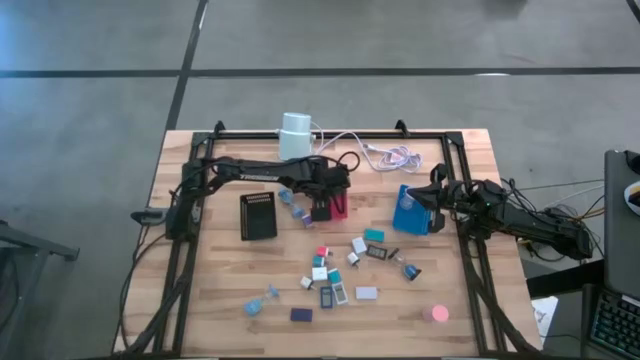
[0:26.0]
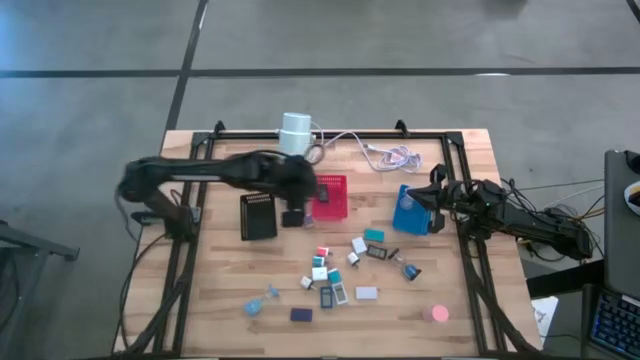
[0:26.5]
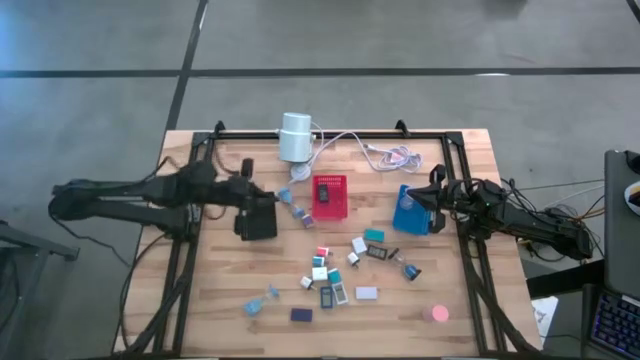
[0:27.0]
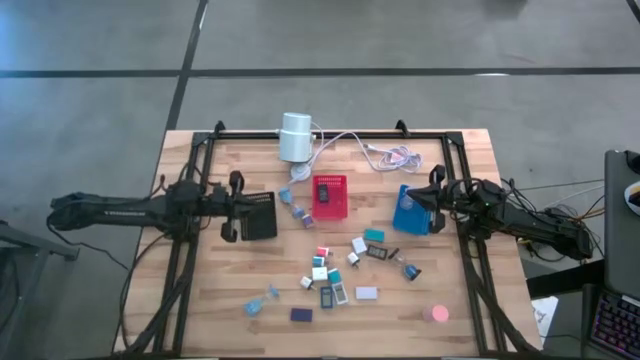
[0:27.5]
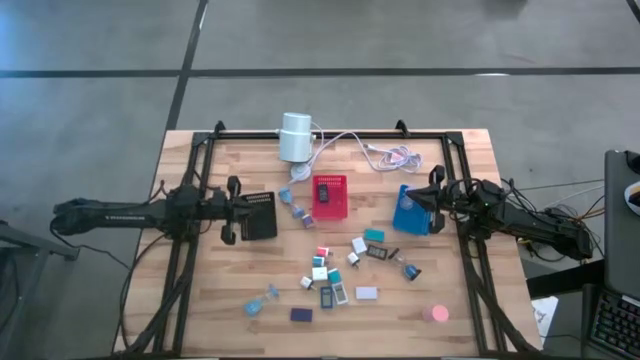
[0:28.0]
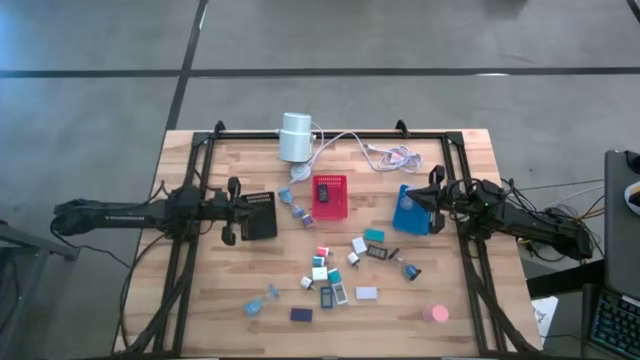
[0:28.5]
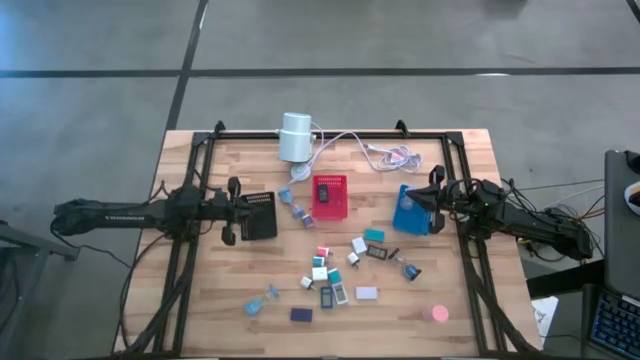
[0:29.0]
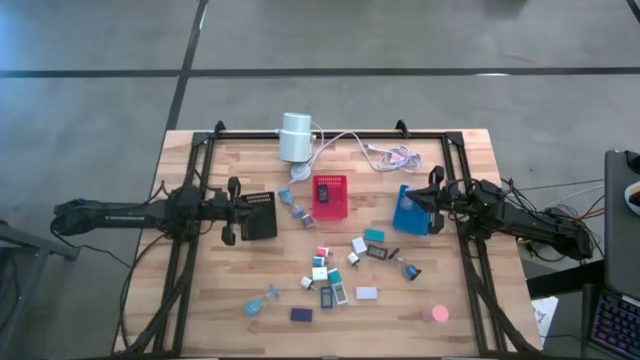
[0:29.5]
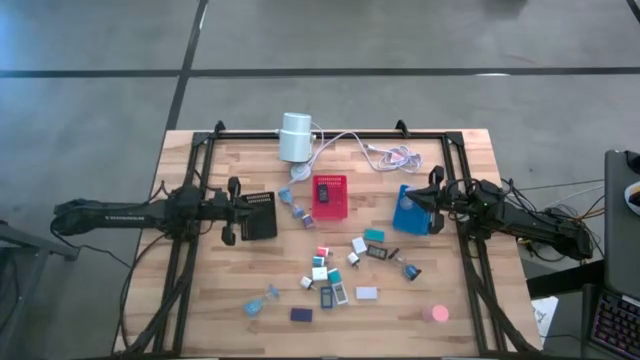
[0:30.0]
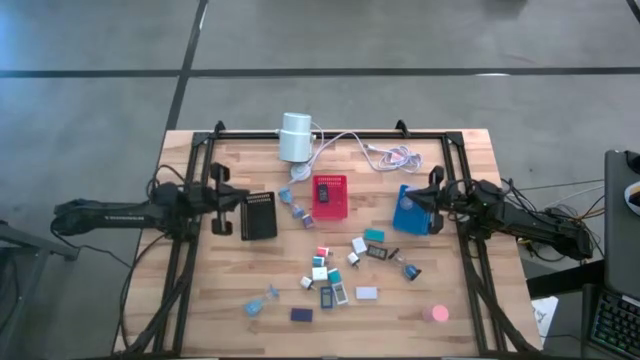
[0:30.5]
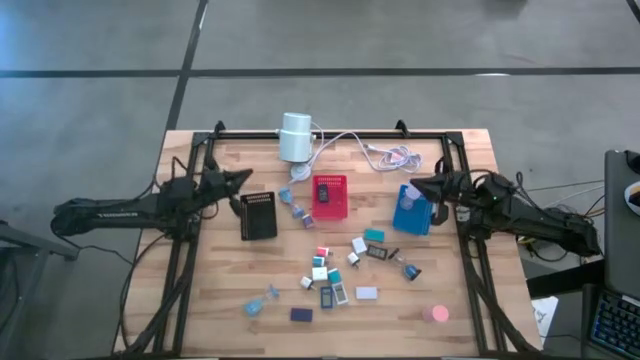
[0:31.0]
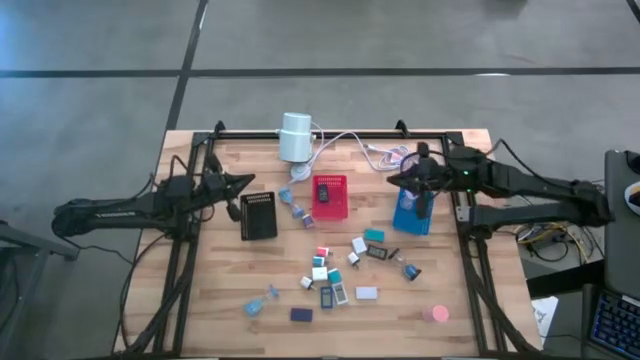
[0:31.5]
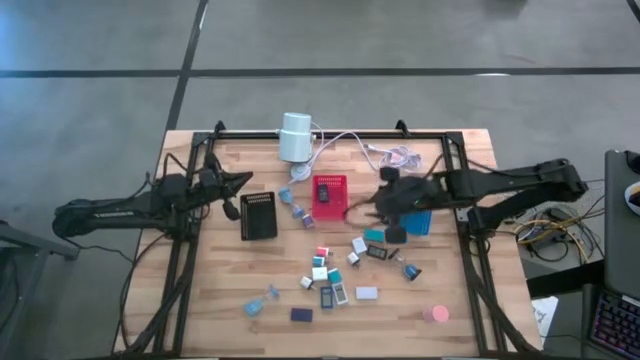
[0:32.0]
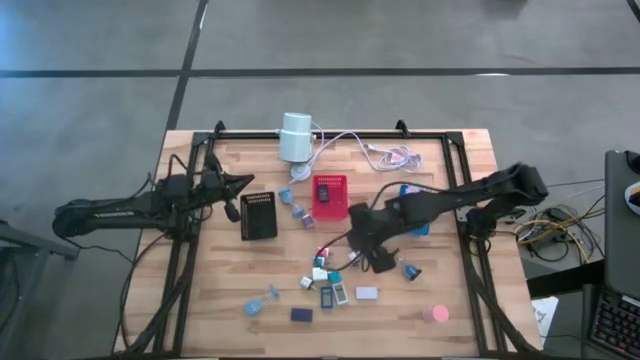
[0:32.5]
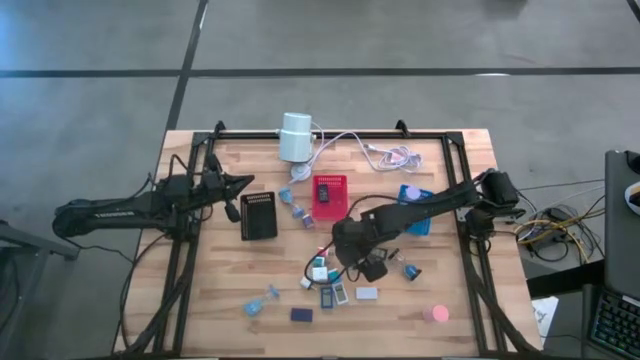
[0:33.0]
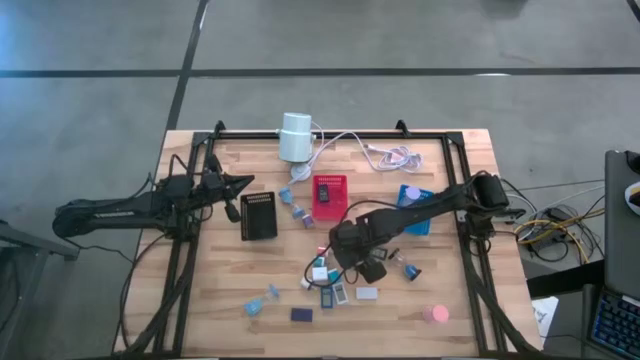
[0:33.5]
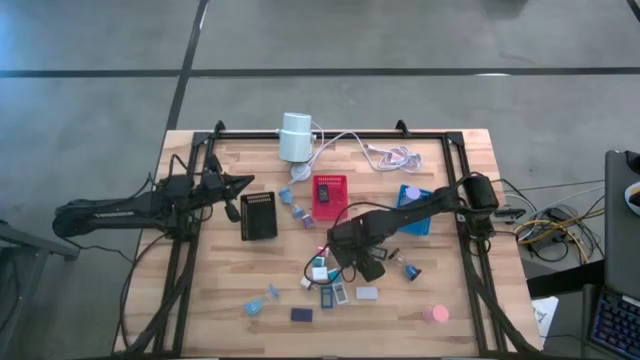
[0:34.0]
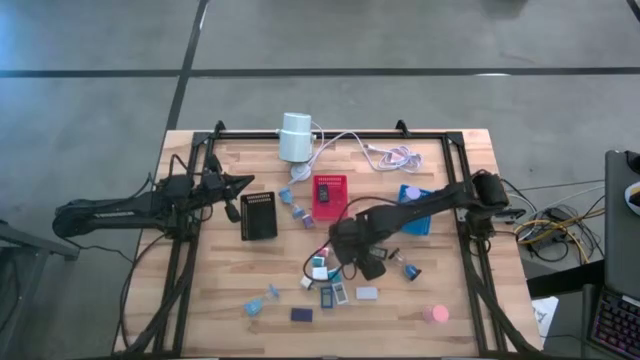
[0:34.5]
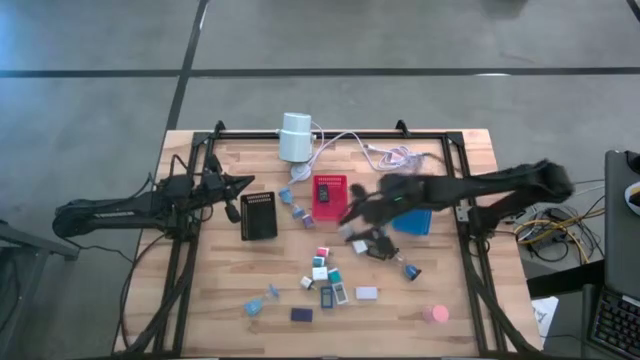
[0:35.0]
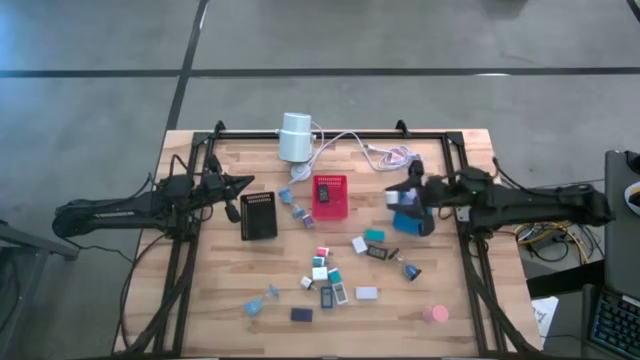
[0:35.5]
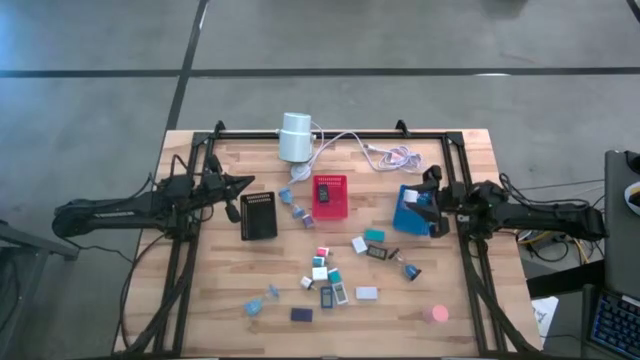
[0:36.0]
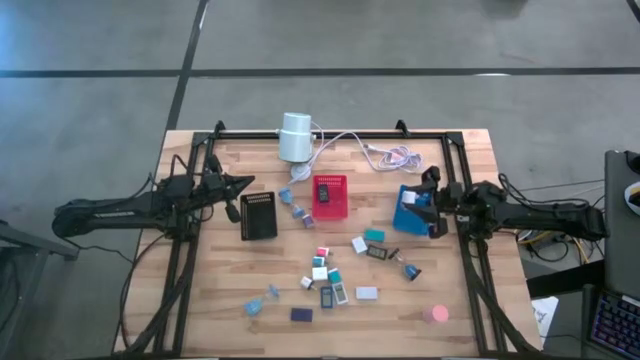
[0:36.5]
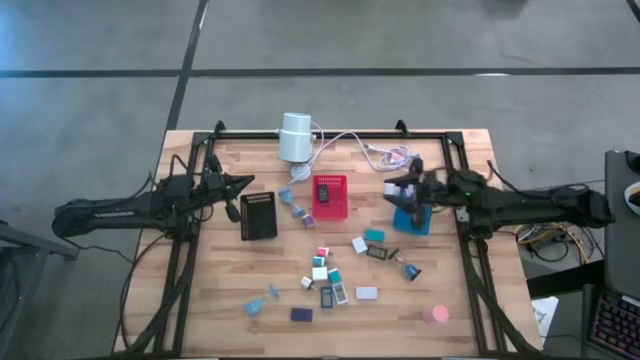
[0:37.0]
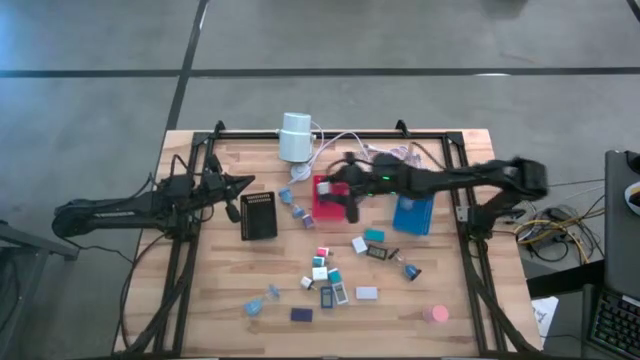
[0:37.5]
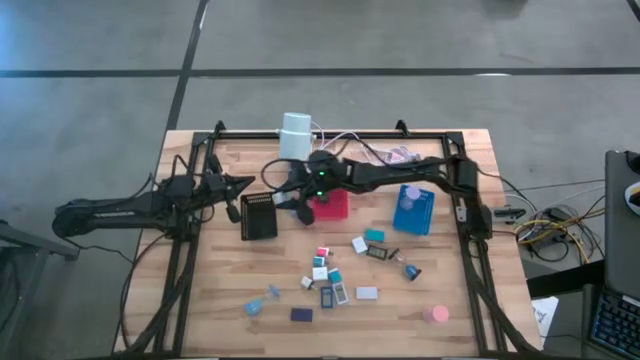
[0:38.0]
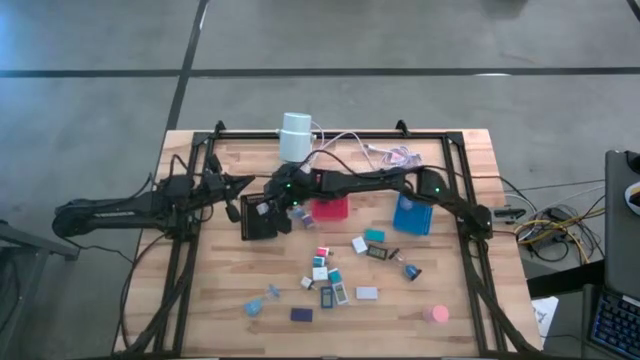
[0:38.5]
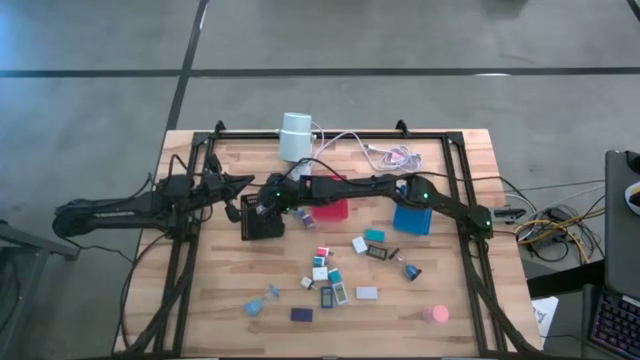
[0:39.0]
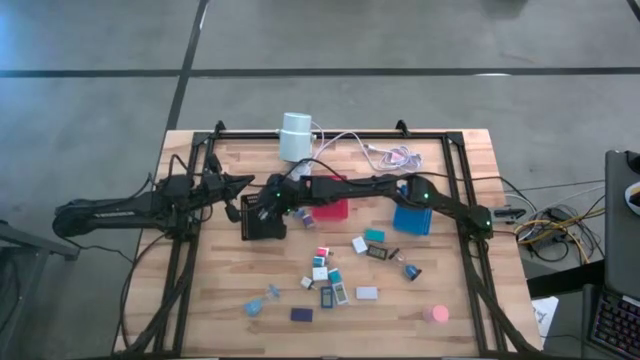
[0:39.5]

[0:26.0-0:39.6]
Task: Pick & Place Office items
Put the right black charger adapter into the black basket
